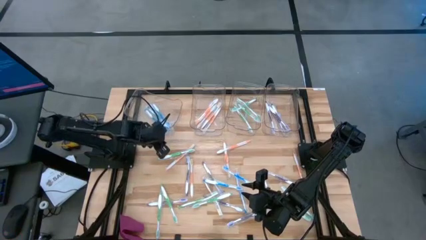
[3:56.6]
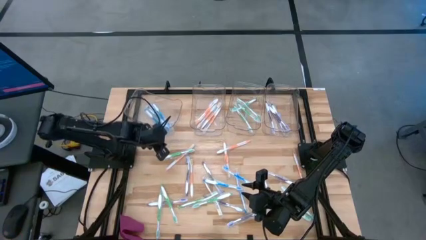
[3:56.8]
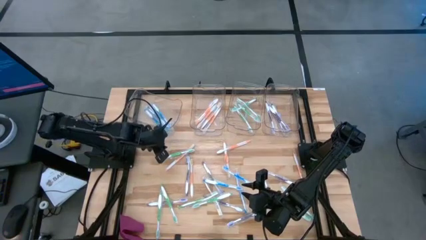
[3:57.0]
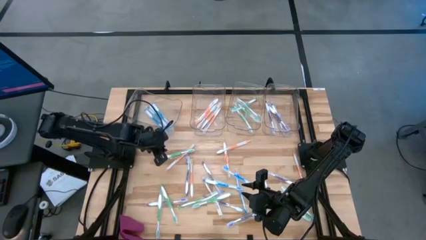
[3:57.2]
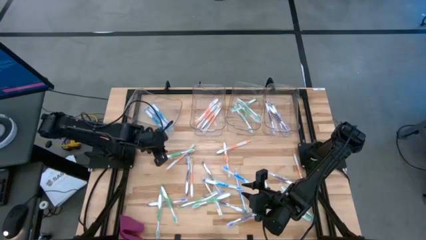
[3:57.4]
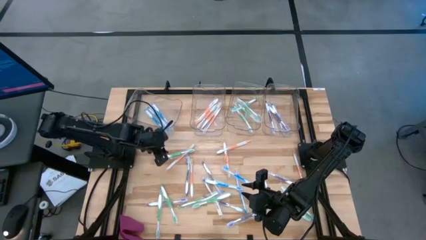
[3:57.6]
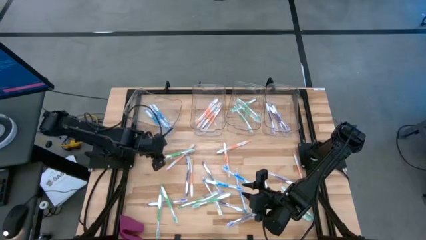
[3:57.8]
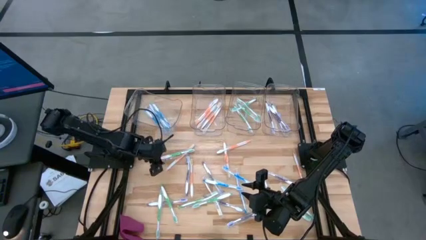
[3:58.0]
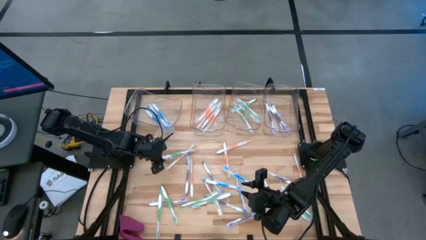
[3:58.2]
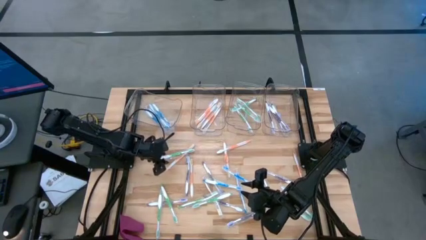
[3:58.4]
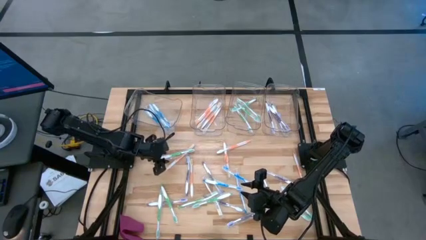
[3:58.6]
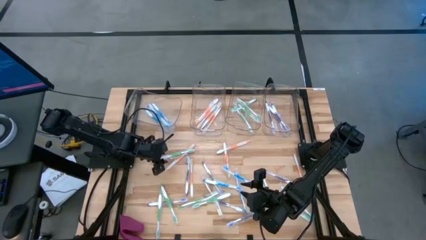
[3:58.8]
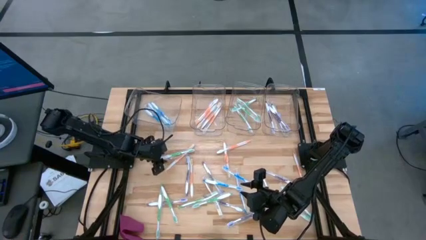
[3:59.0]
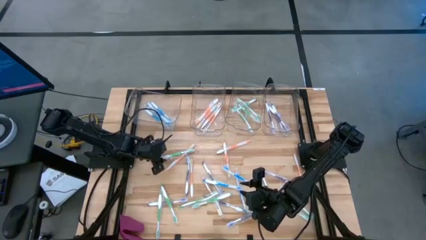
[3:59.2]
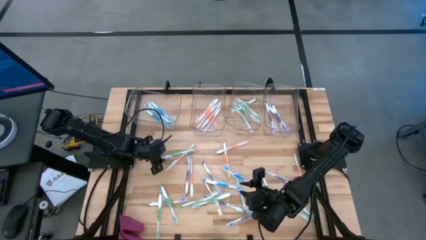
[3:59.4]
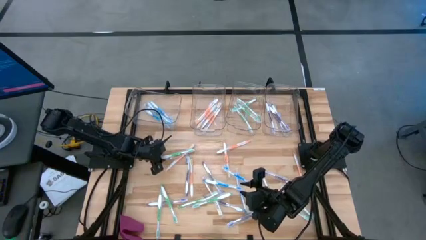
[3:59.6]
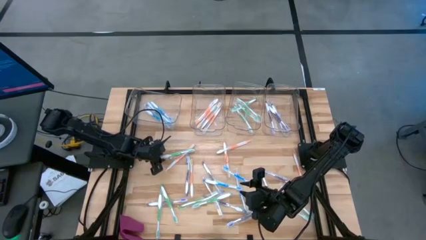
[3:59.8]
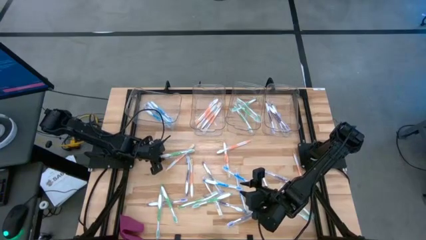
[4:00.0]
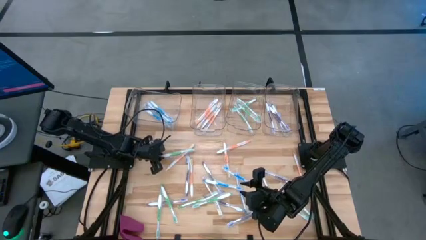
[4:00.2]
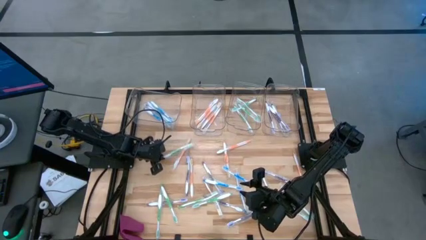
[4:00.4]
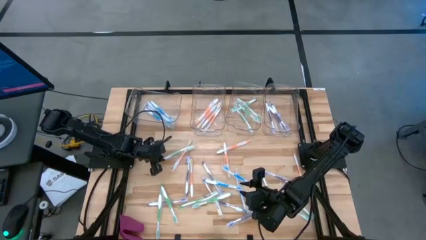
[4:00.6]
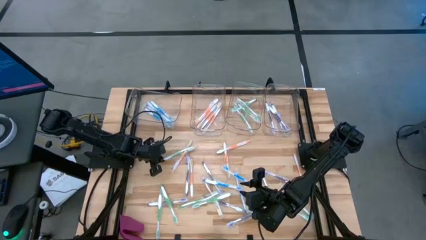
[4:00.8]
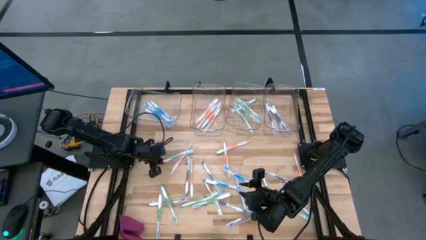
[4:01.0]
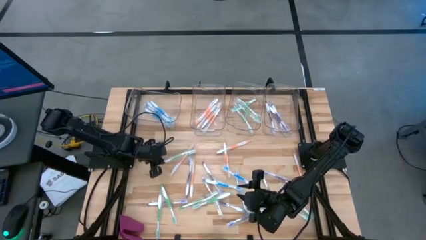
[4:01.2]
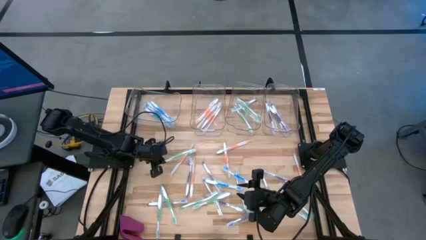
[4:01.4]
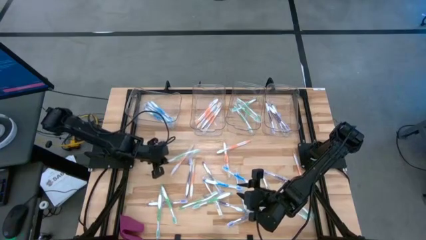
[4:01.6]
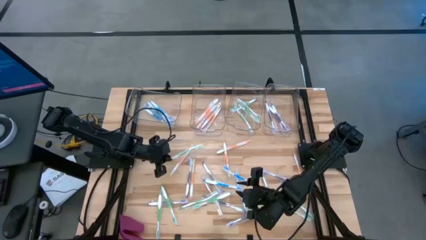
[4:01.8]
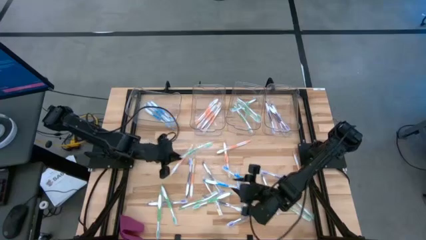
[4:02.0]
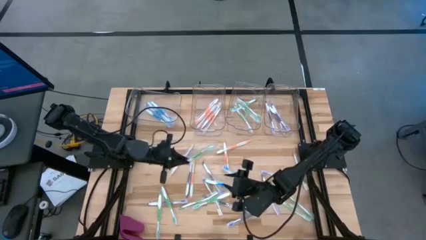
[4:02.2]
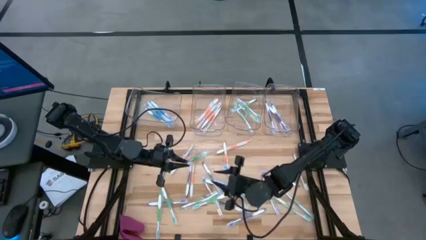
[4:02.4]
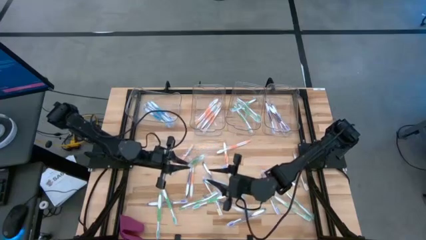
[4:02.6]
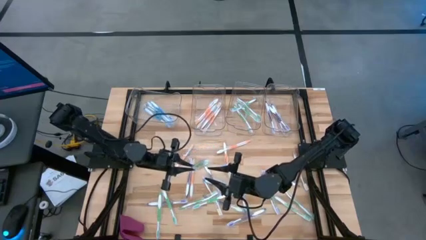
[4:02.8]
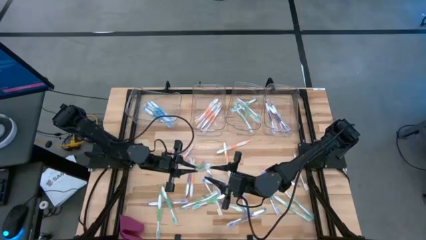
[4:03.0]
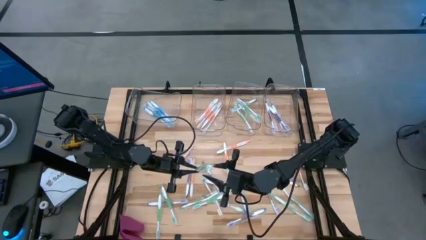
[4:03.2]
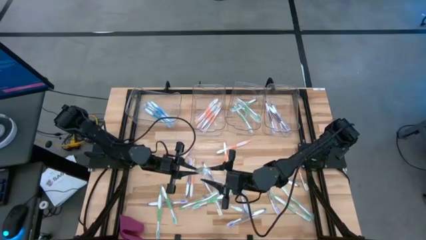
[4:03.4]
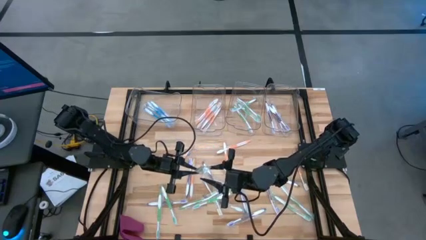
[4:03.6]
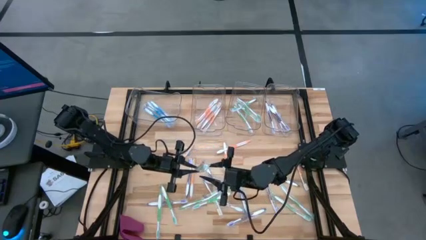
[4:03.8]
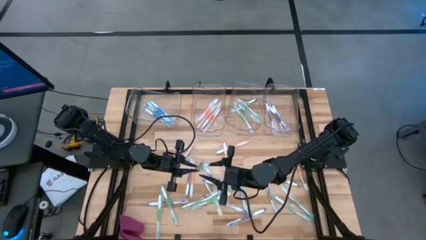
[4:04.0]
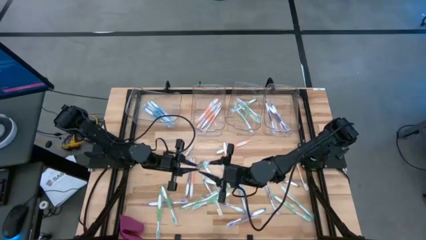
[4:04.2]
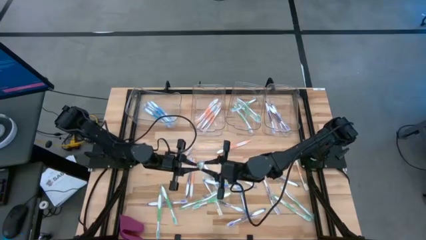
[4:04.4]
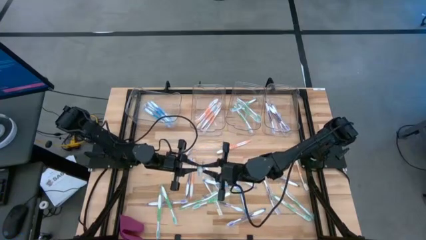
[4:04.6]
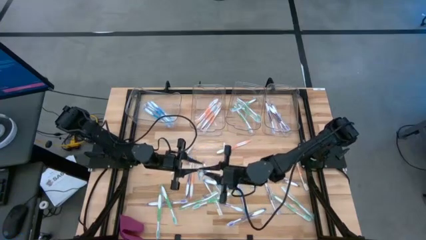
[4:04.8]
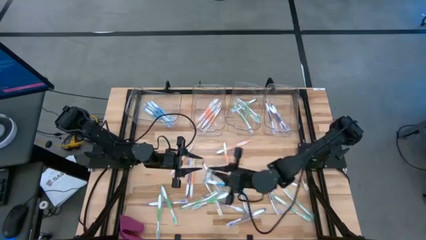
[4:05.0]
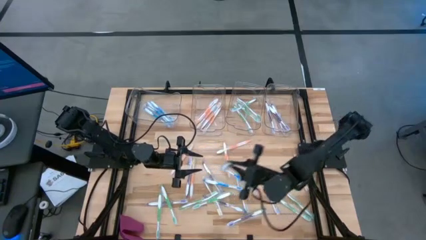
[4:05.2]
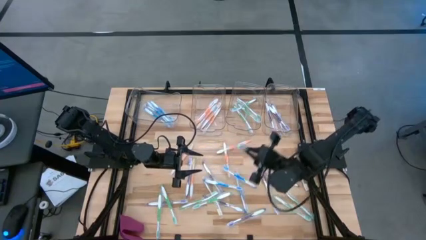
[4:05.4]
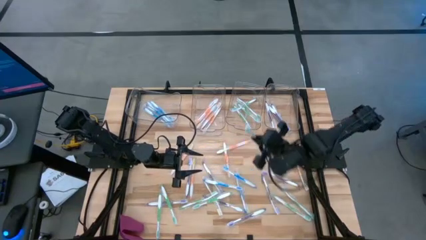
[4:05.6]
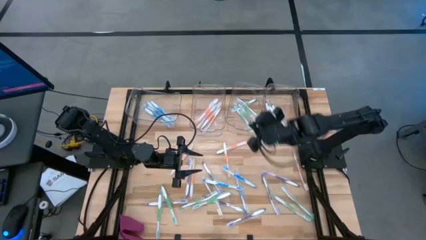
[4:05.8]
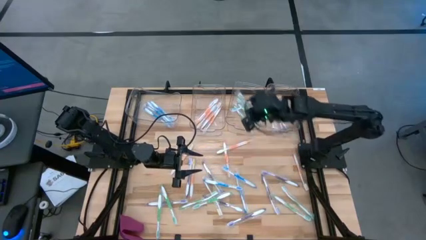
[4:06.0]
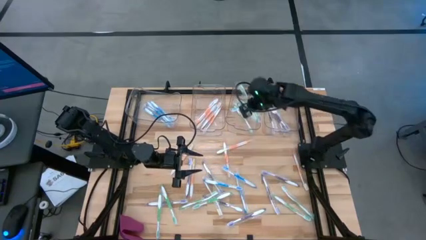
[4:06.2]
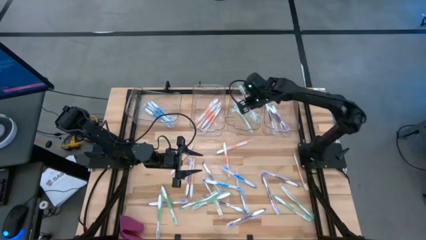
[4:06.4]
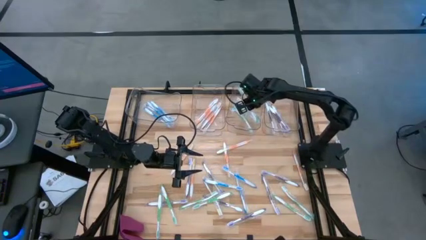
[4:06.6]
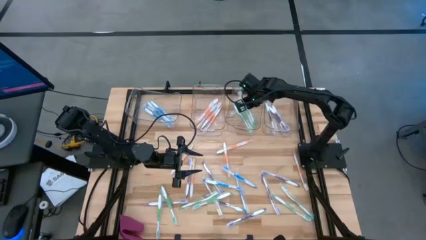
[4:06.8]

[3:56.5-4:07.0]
Task: Pick & Place Toothbrushes
Put the green toothbrush into the middle right transparent bin

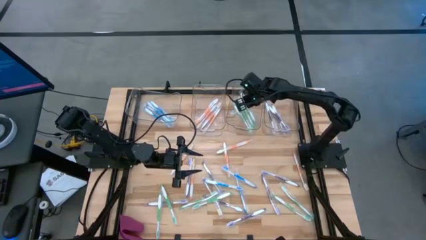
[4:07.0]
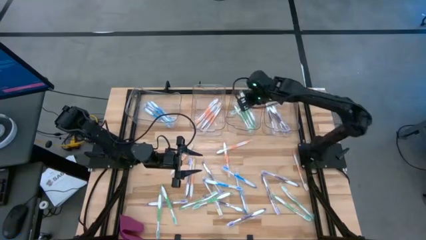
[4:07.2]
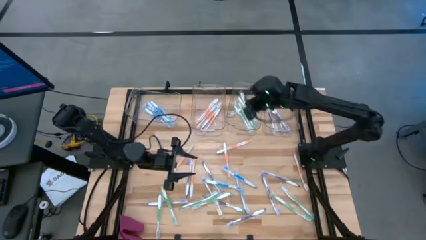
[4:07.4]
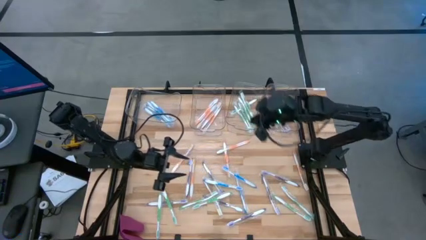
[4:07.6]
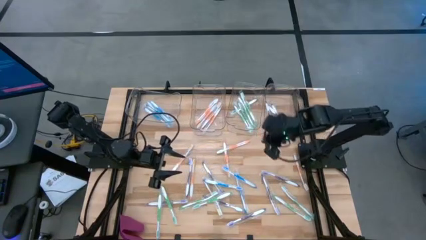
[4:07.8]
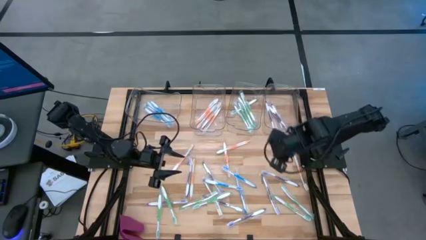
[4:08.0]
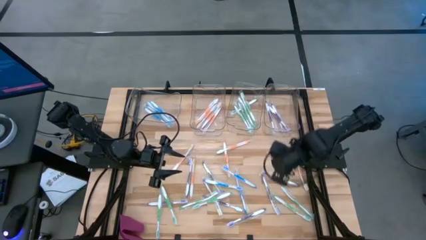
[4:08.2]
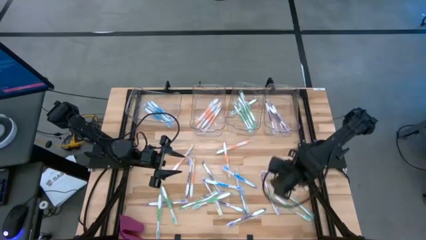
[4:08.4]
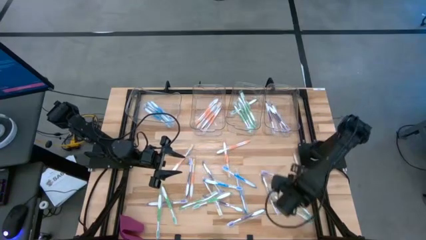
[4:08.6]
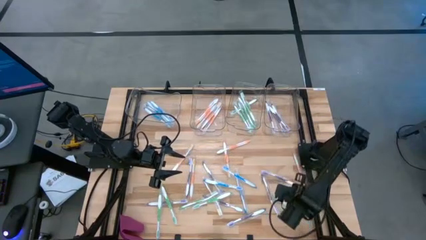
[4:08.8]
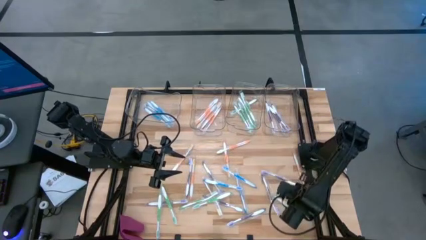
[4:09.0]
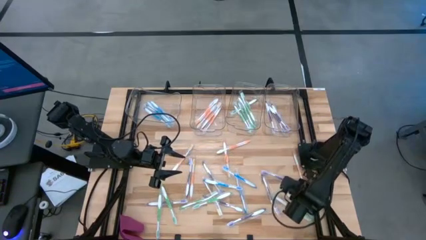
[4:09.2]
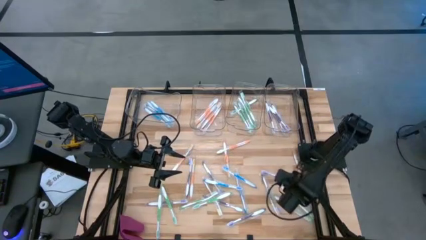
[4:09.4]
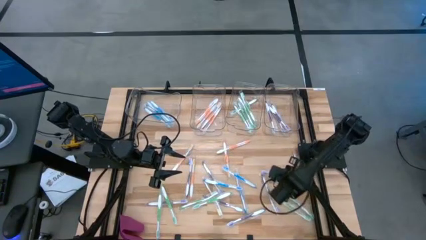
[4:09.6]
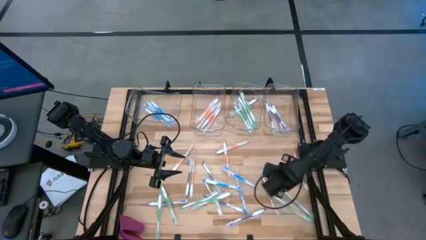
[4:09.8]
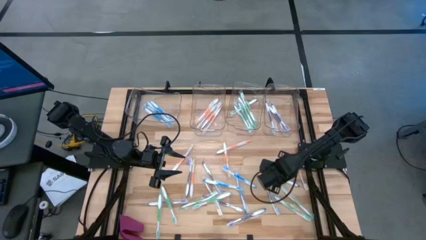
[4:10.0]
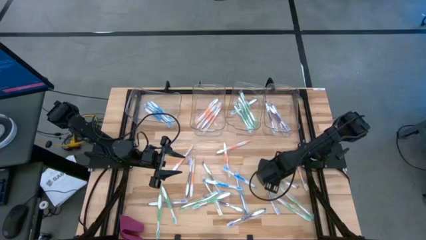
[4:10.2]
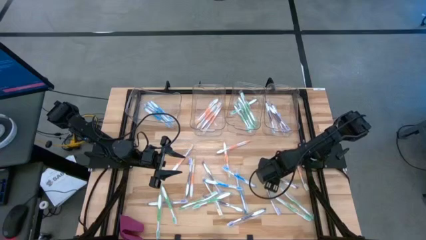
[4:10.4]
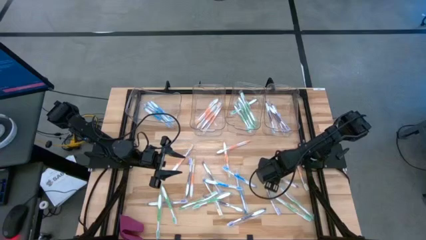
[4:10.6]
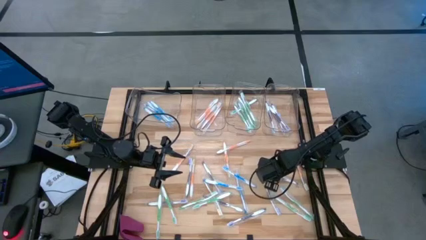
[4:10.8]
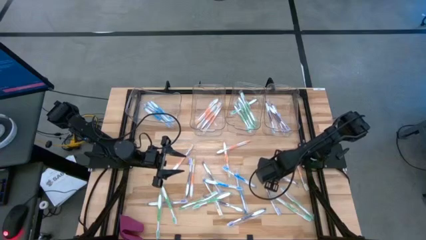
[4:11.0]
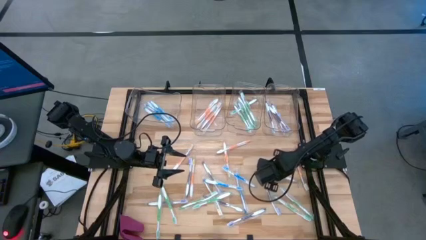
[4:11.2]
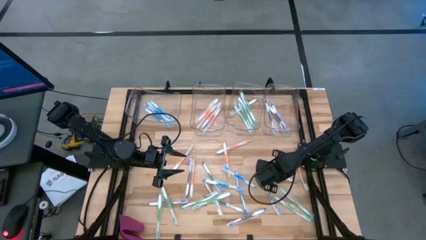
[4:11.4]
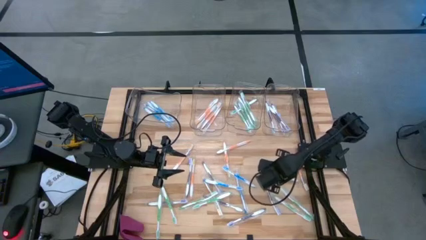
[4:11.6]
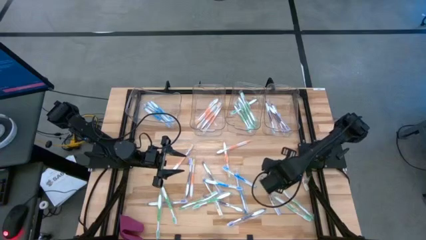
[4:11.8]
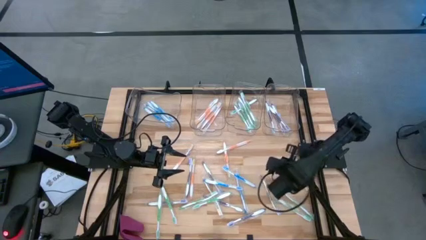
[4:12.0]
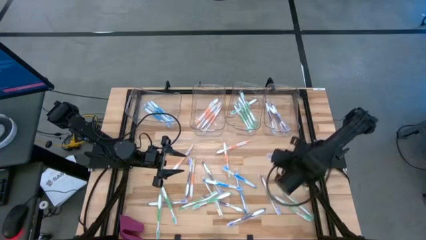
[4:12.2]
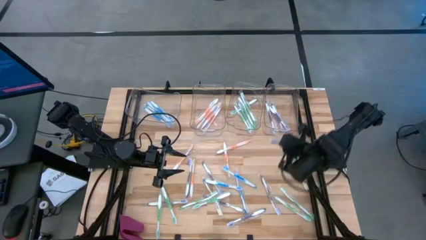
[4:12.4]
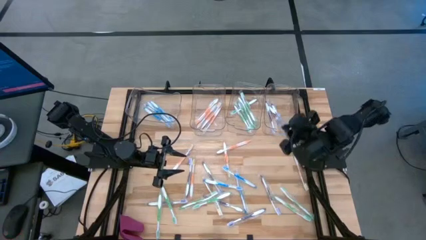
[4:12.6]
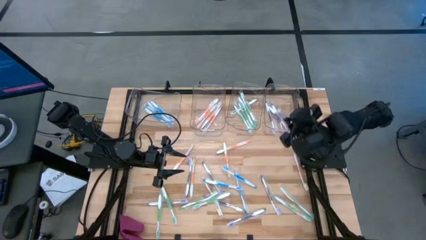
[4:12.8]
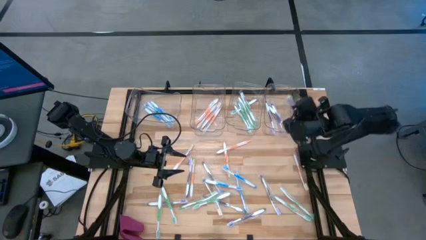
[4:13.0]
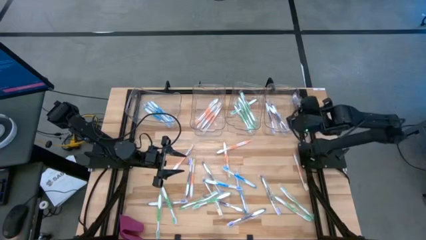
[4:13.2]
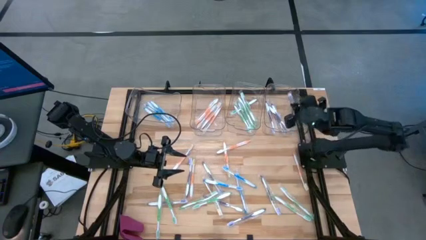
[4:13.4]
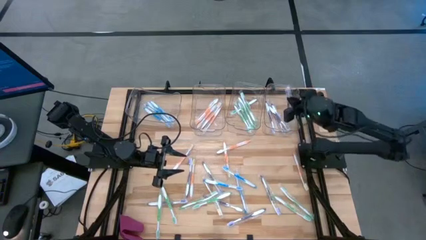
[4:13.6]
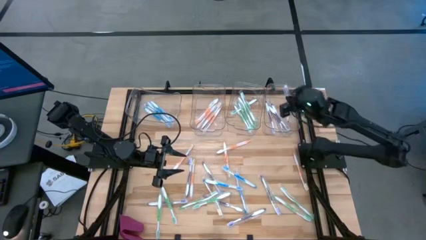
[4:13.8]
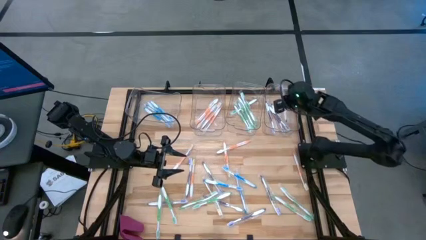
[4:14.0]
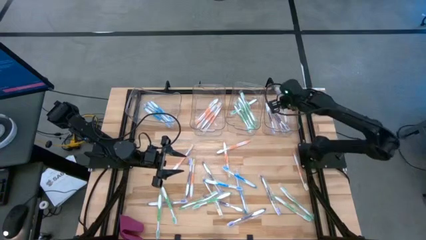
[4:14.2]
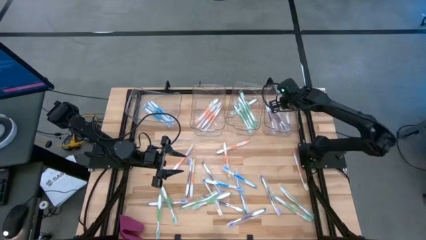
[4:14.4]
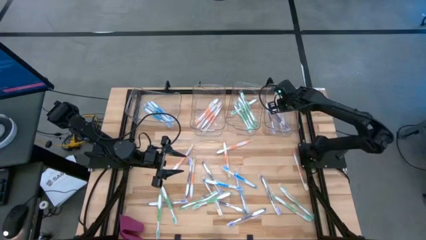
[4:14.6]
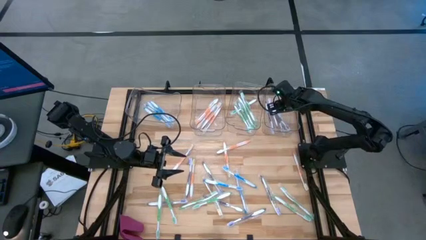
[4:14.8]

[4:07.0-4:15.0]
Put the violet toothbrush into the right transparent bin
